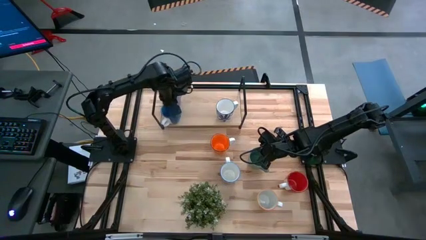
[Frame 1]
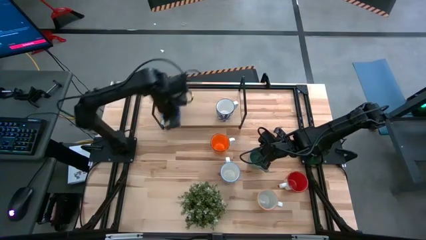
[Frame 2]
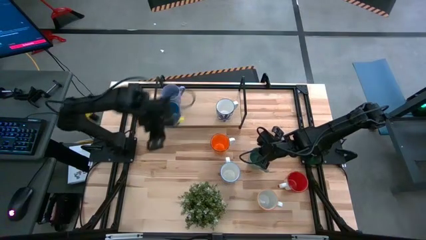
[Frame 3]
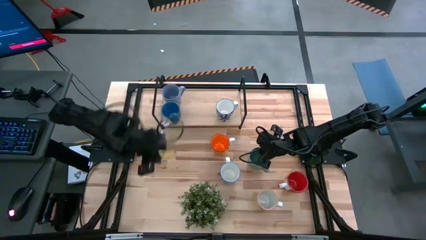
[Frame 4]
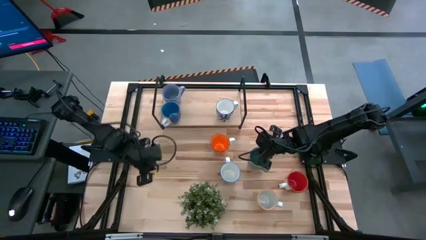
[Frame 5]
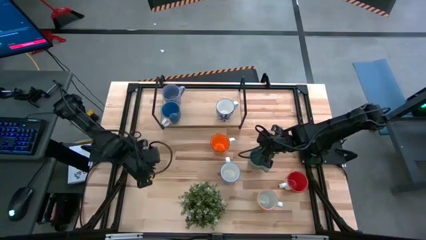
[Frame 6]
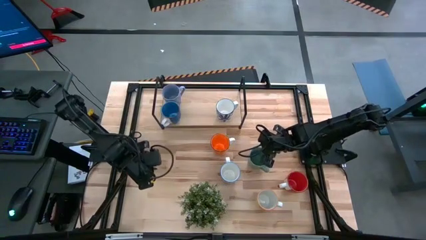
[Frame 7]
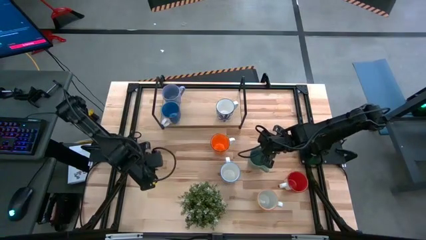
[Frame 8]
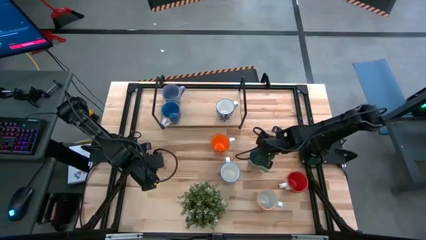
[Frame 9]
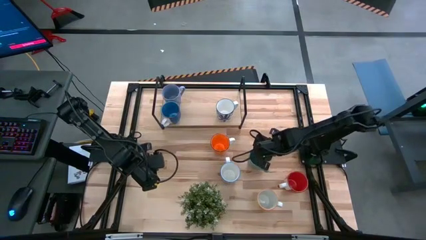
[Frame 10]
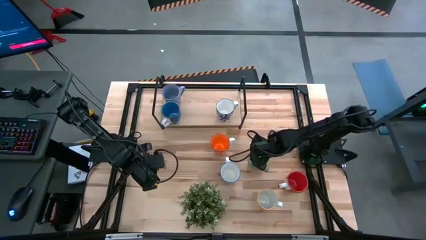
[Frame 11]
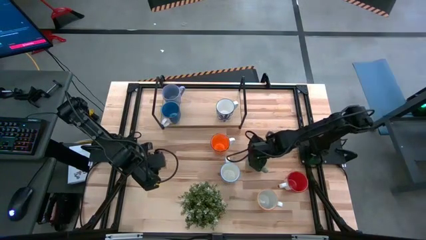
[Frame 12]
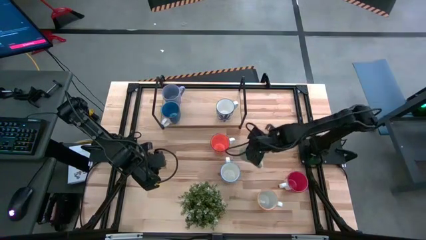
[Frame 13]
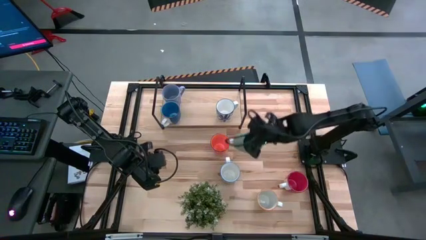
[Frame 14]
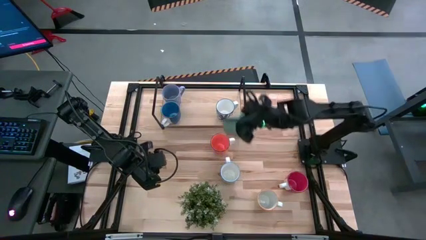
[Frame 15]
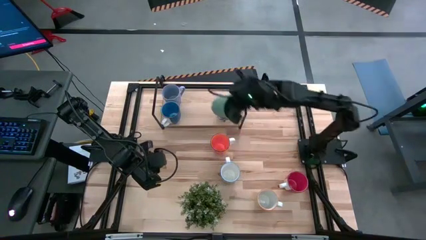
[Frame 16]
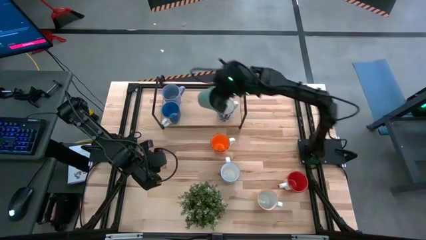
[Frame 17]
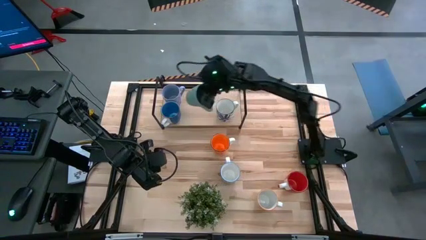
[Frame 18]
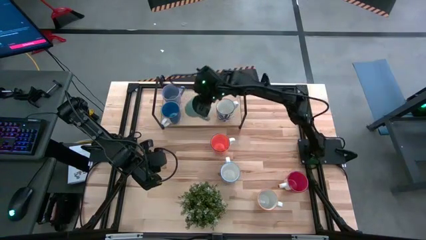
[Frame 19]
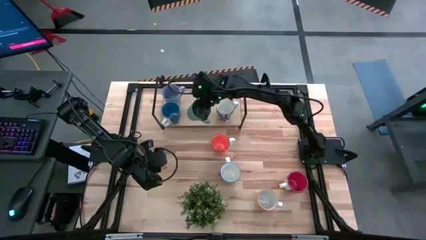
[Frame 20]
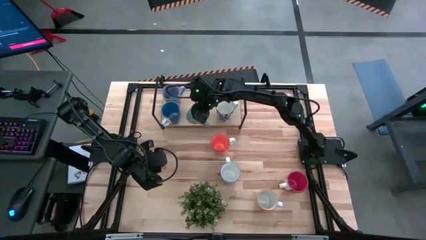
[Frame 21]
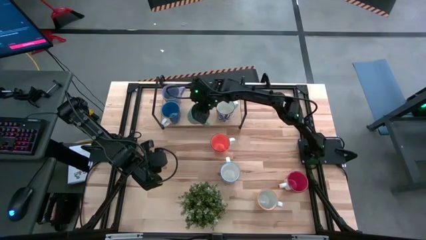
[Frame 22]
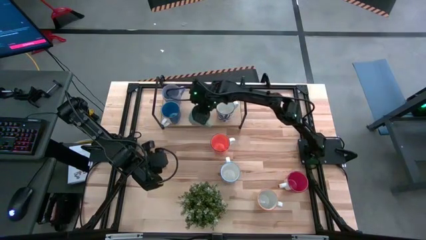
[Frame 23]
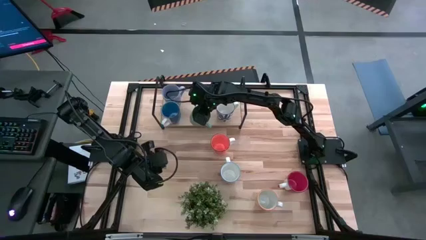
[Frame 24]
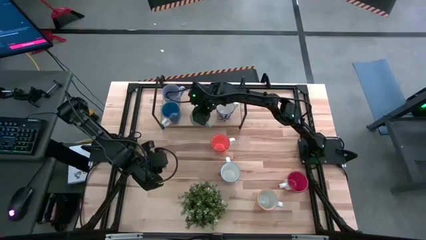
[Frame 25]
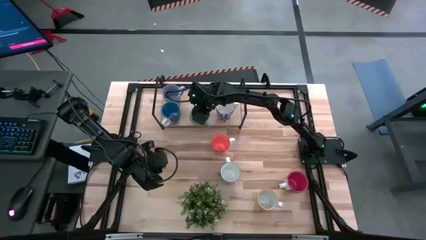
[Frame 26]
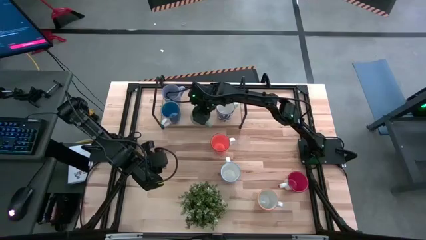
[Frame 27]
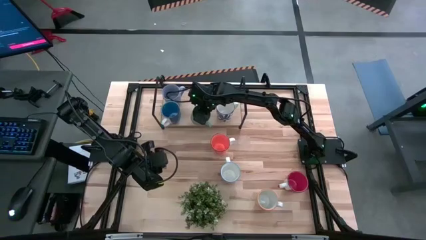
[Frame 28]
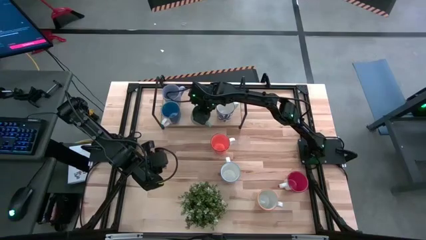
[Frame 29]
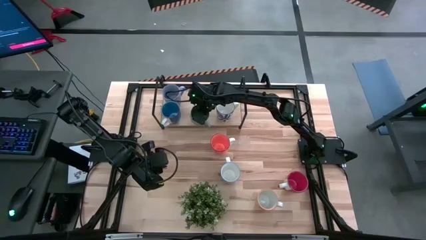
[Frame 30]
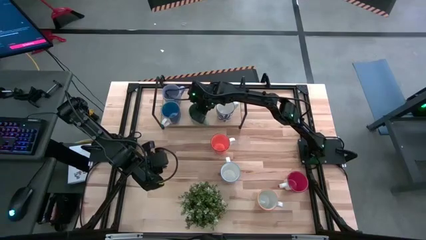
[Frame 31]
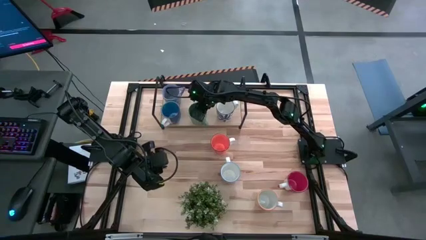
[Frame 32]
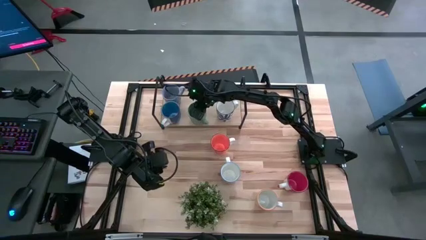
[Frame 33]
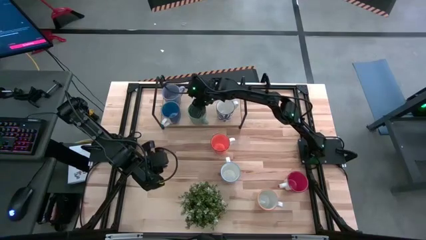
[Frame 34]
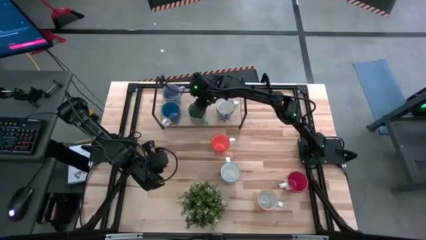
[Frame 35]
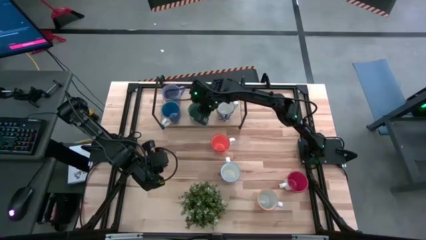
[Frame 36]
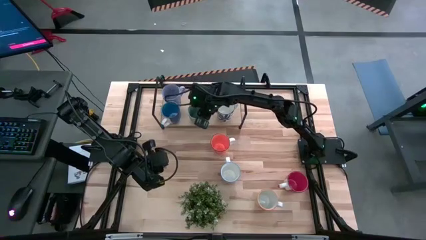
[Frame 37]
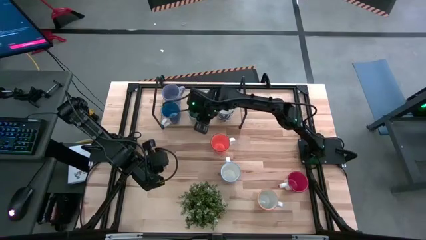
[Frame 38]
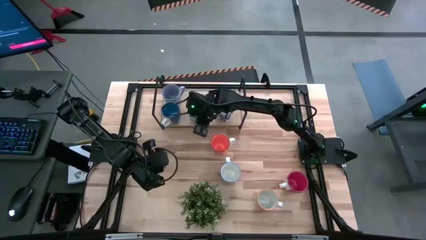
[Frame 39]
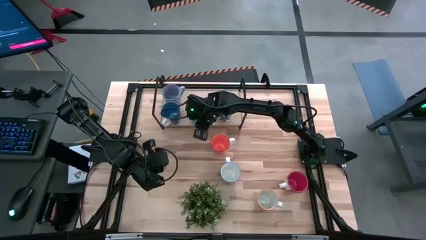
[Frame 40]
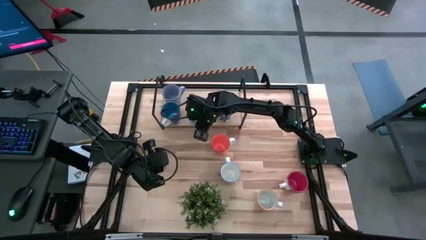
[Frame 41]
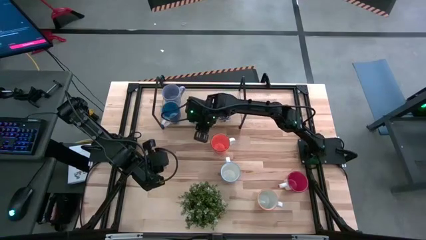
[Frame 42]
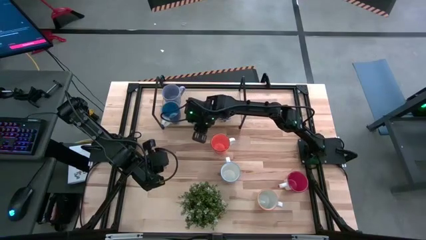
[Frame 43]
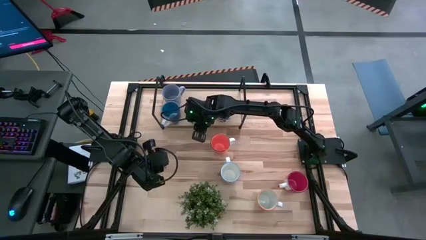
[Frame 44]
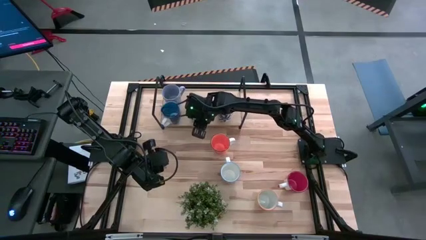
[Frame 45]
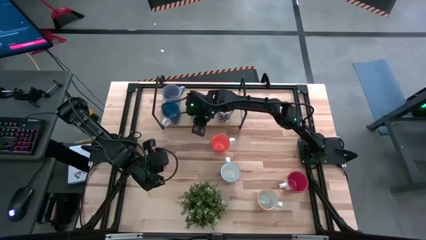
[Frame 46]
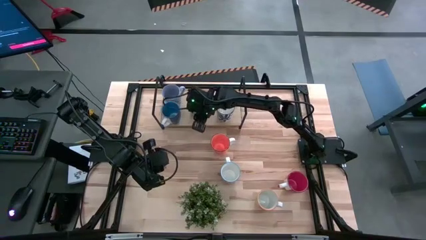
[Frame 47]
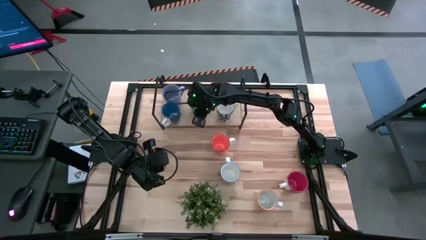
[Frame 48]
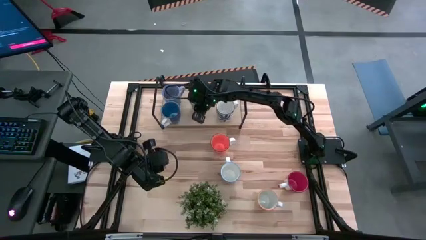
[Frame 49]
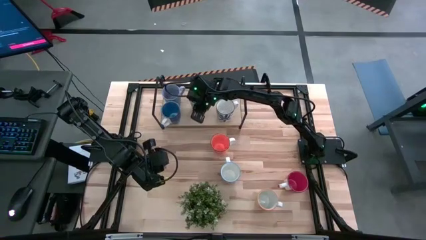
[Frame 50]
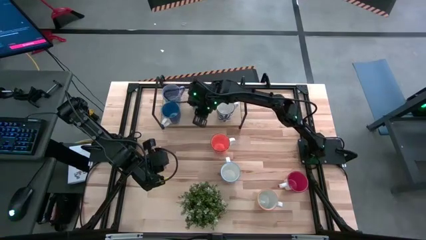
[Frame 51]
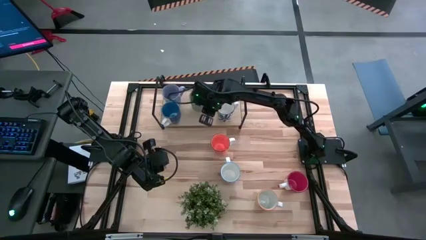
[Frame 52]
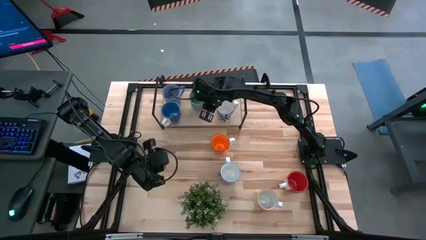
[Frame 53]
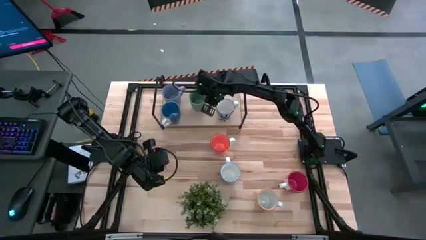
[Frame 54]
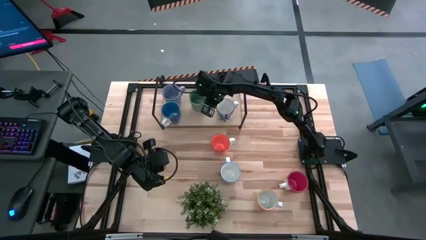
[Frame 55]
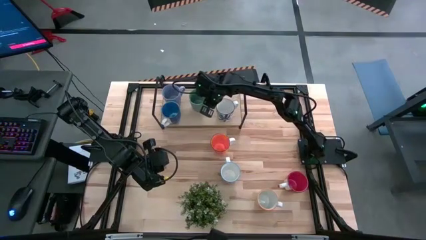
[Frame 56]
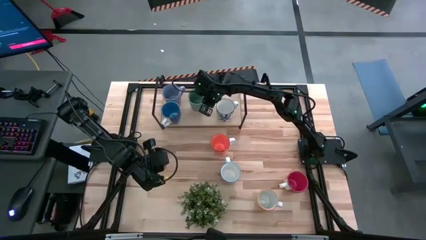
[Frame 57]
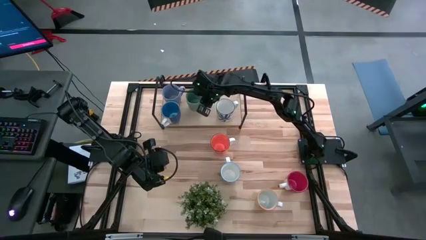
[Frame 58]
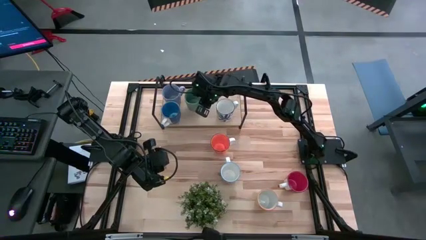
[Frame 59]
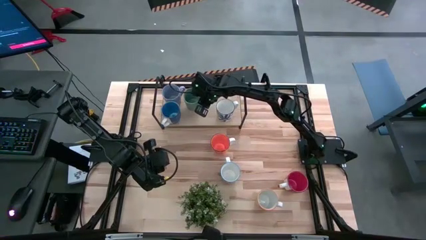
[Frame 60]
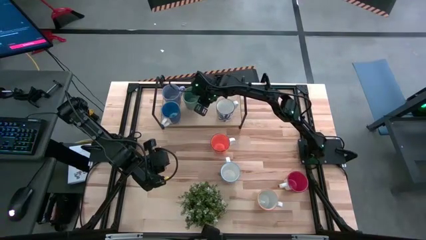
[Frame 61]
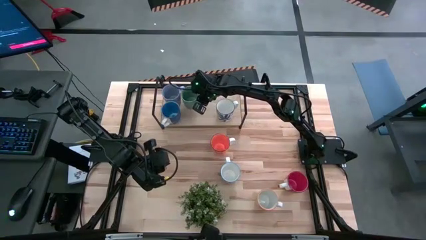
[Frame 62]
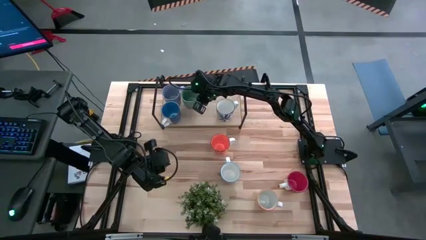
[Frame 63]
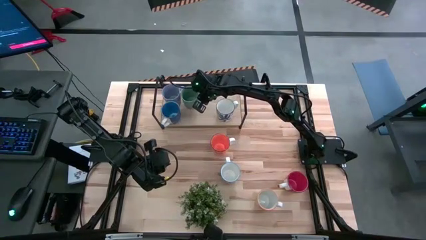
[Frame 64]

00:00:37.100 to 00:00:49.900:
Task: Place coffee mugs
Put the green mug on the shelf

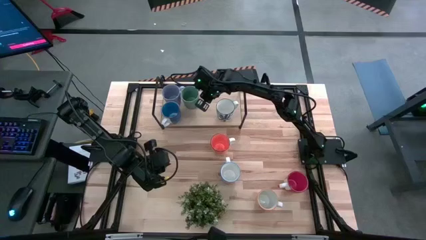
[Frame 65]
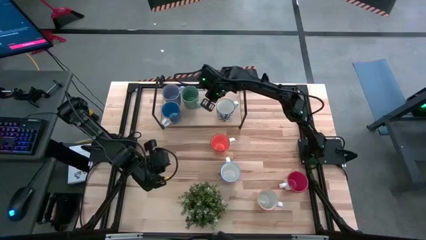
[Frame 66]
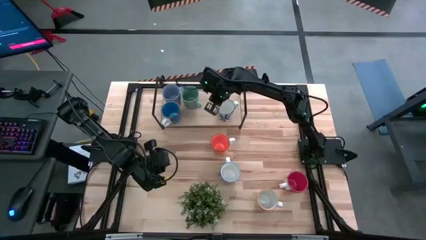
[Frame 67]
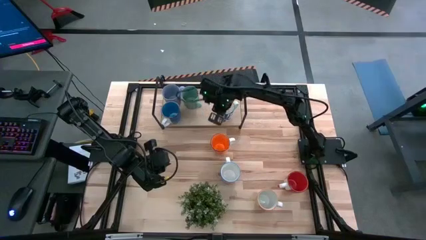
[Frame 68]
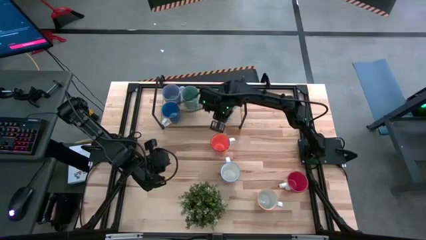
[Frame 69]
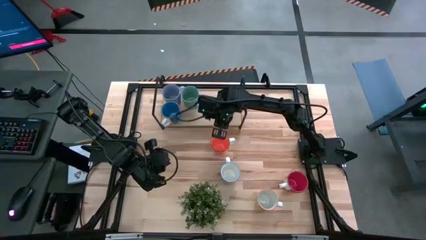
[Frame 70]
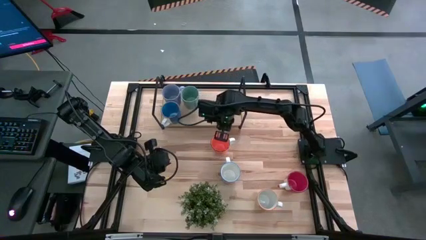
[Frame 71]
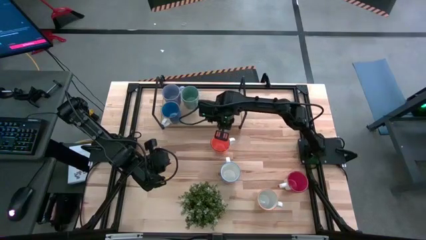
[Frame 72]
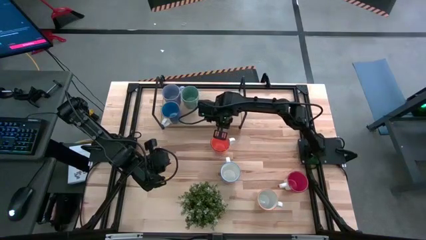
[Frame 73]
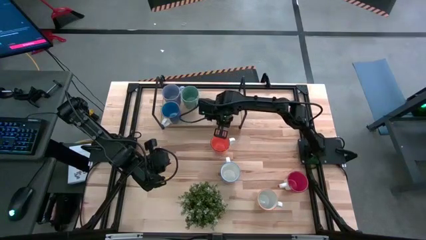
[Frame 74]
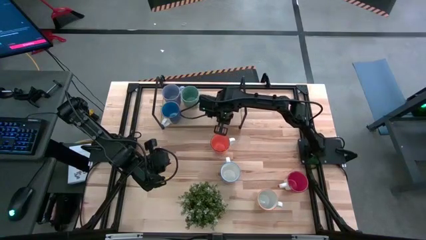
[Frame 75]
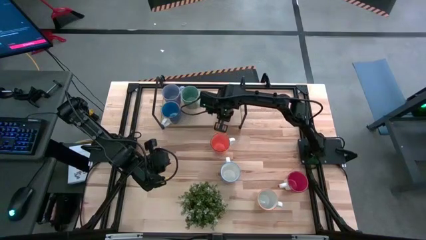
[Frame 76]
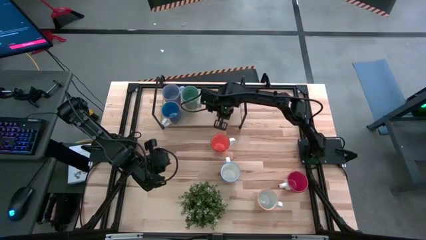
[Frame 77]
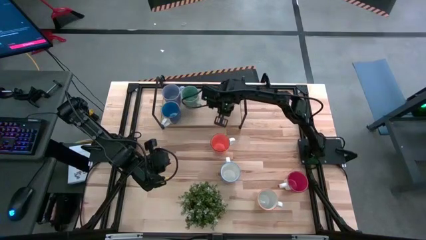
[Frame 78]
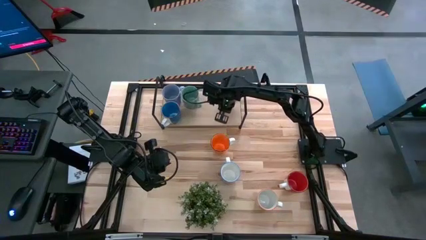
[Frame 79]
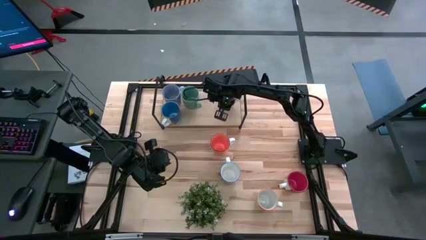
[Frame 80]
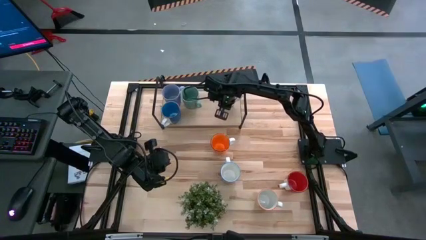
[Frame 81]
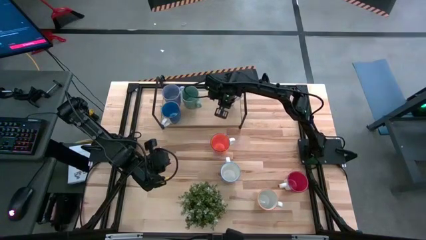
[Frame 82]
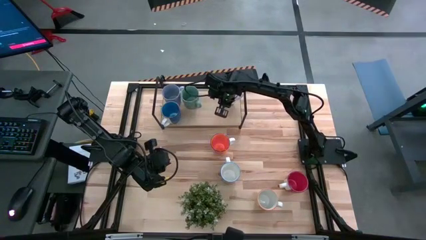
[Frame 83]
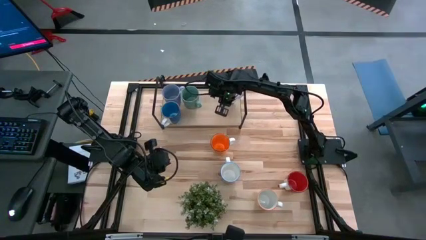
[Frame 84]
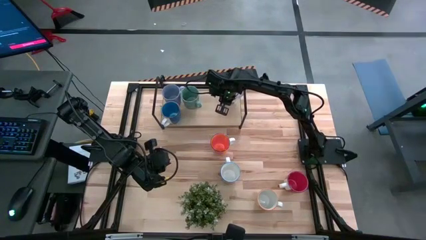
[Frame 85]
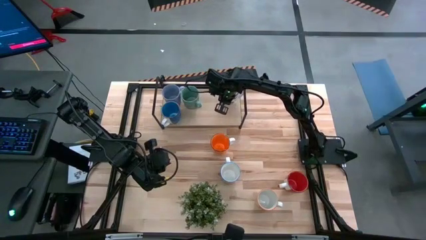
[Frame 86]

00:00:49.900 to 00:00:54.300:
Adjust the white blue patterned mug on the shelf
